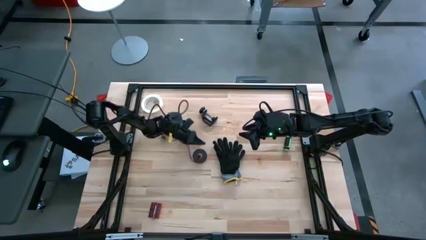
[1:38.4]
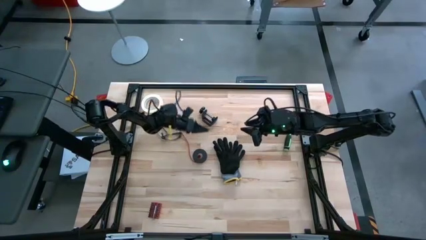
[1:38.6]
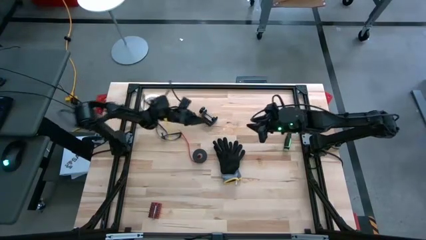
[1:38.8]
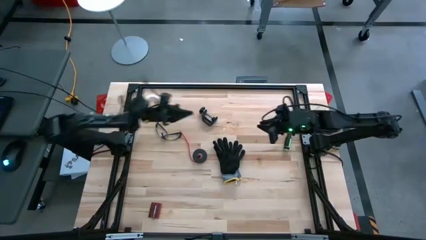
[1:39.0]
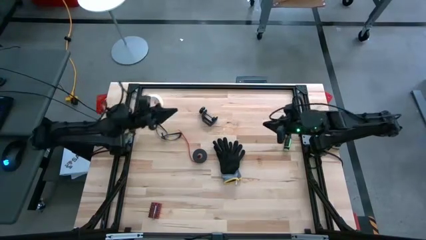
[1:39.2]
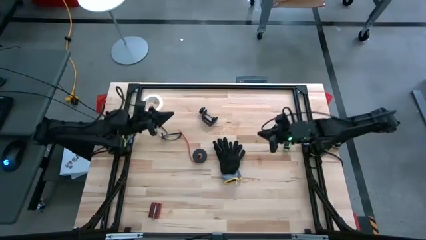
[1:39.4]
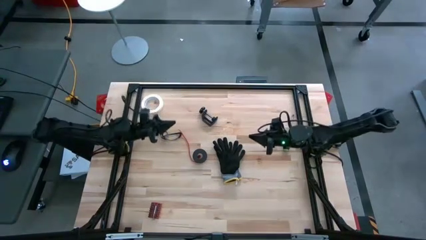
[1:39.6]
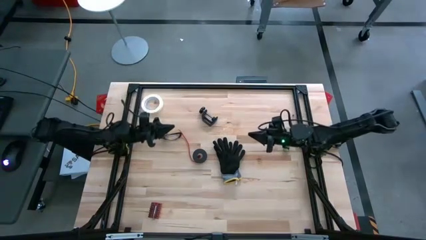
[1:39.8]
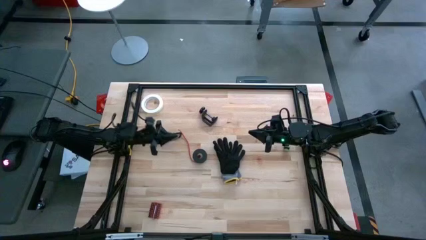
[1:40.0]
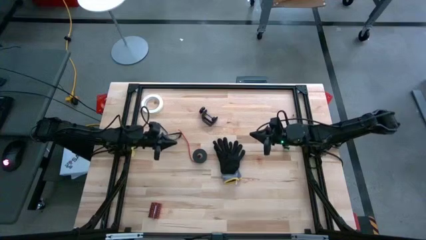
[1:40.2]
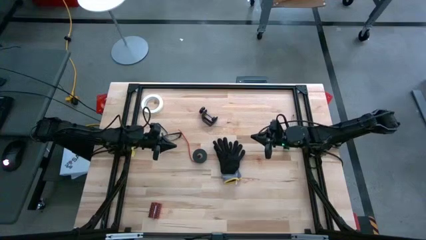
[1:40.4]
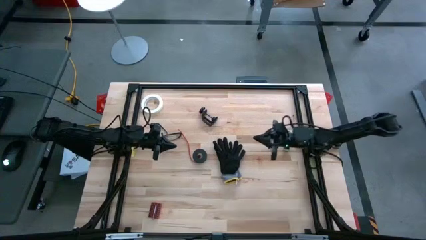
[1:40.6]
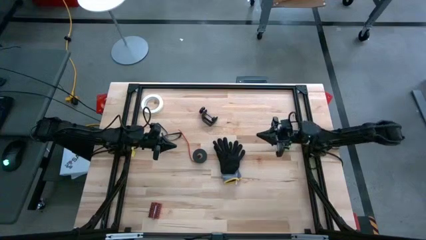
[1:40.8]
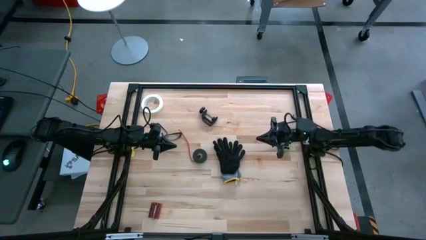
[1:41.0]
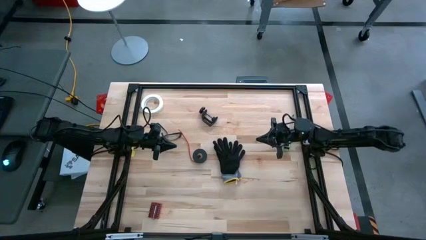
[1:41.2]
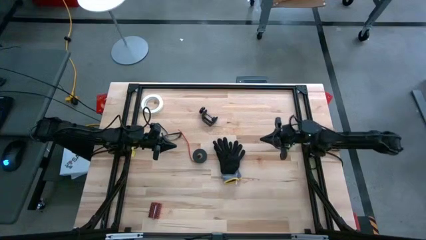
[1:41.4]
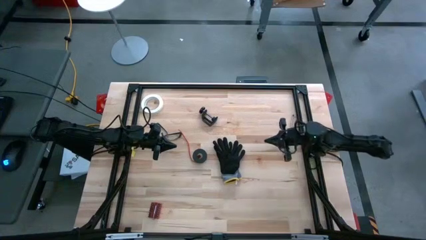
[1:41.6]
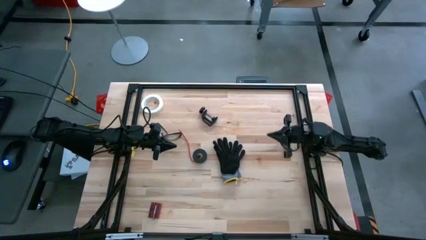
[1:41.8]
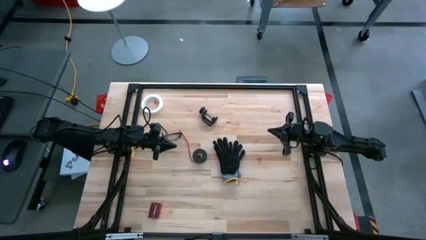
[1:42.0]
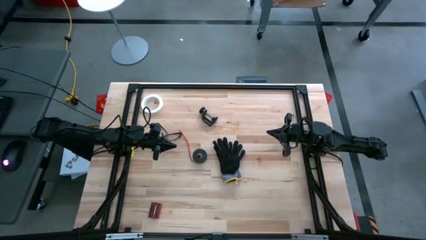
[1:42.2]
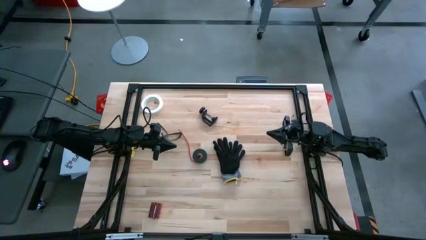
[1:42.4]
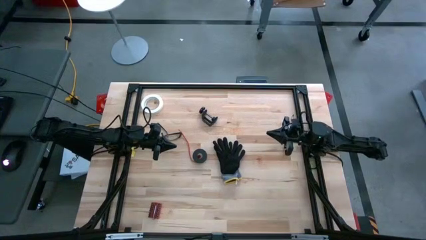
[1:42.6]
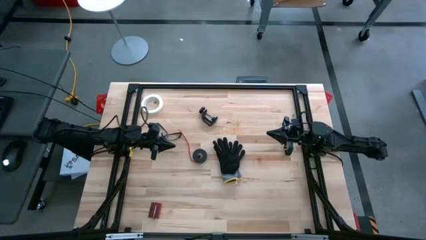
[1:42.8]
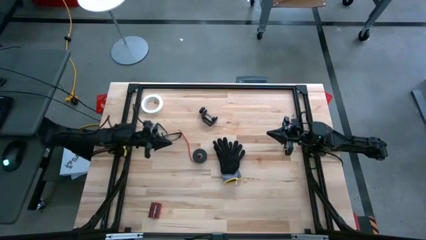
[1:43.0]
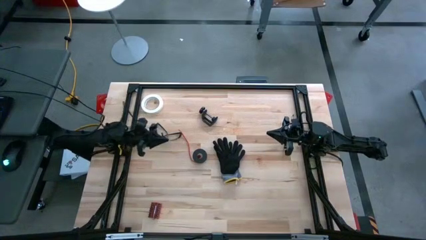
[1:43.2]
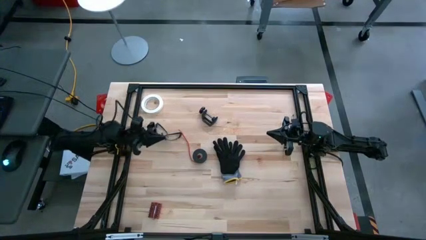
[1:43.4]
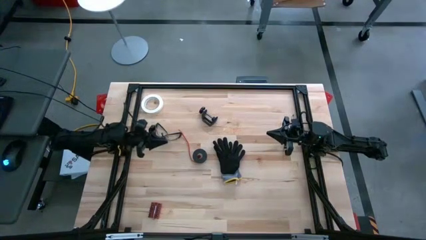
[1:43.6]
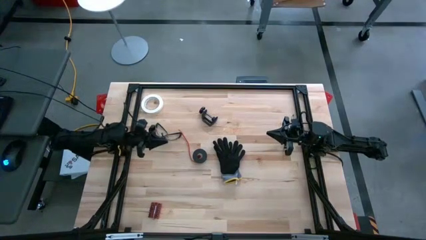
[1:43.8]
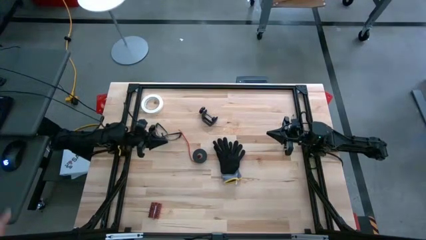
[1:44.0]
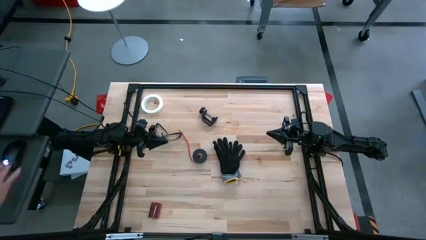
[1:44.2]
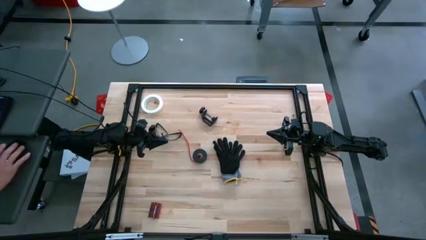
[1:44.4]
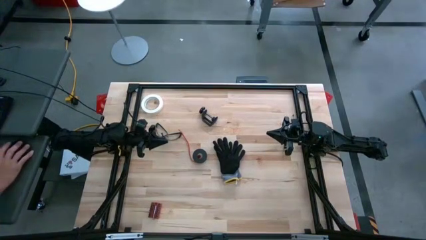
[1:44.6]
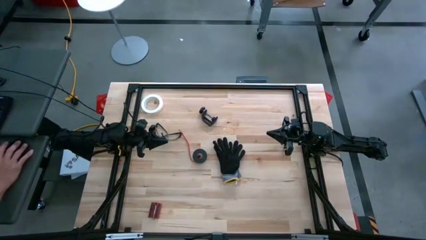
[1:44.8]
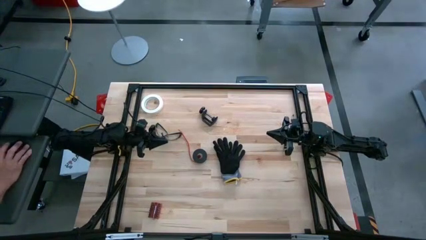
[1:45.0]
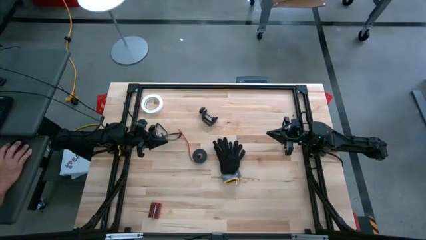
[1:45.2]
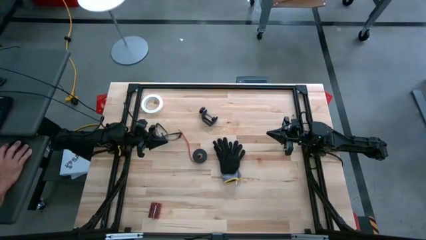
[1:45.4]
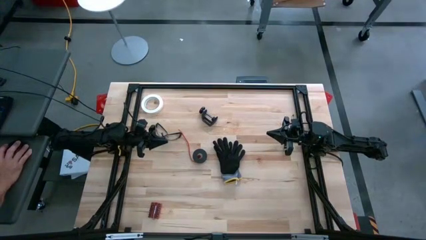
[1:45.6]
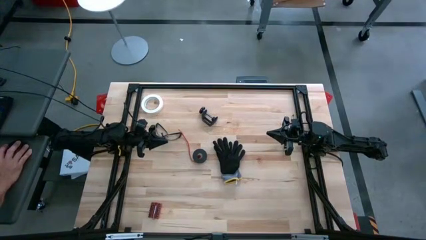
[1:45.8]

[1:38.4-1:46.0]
Task: Coil cords
Return to Home Position

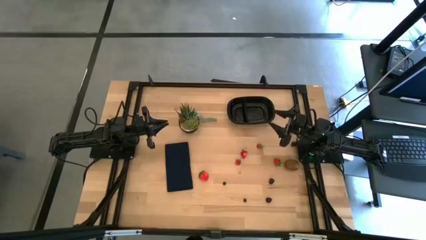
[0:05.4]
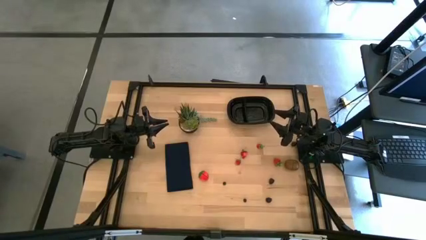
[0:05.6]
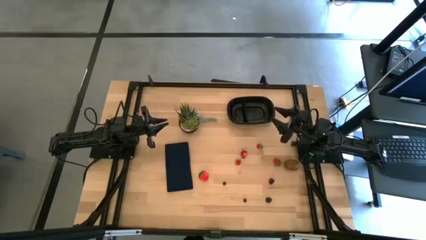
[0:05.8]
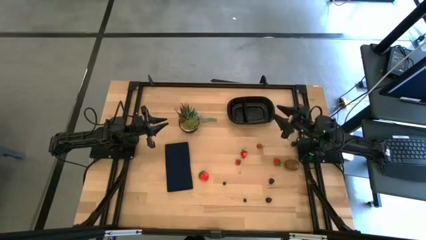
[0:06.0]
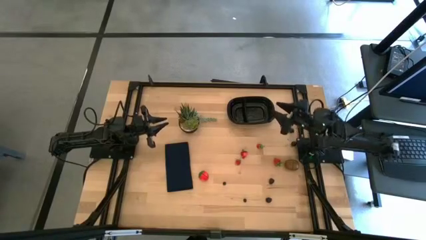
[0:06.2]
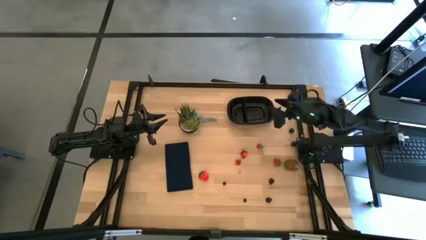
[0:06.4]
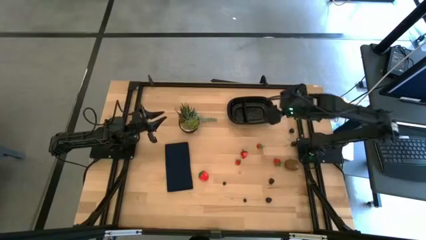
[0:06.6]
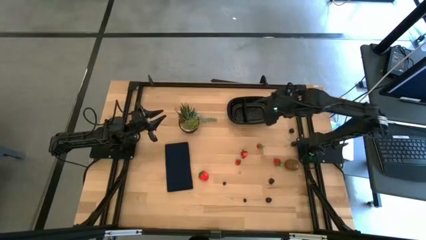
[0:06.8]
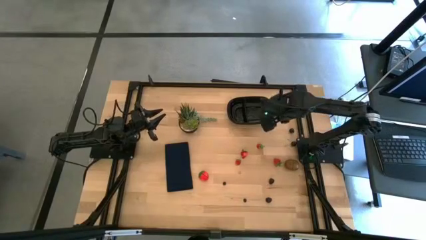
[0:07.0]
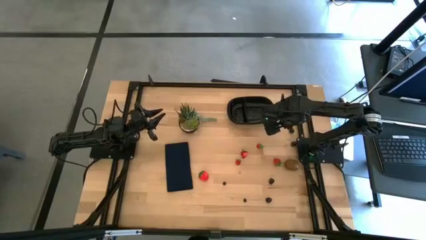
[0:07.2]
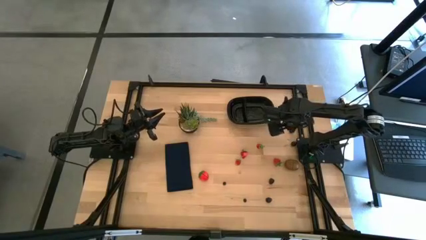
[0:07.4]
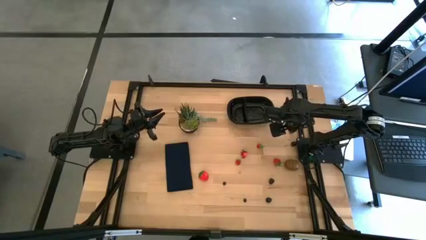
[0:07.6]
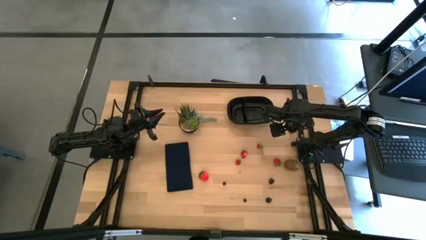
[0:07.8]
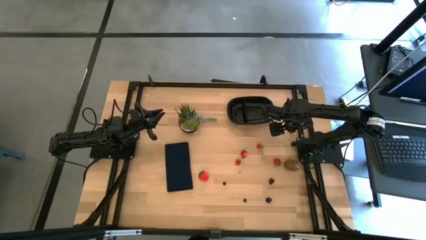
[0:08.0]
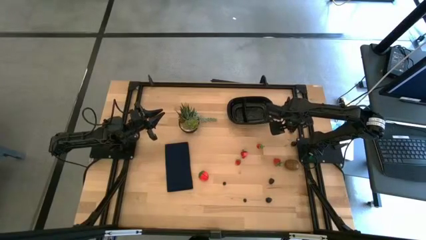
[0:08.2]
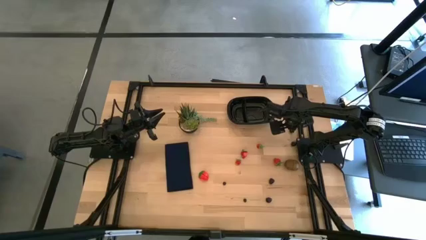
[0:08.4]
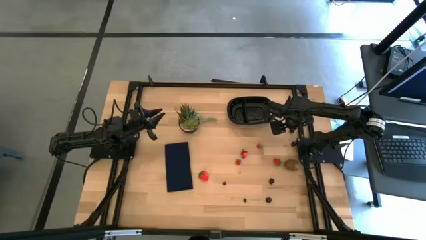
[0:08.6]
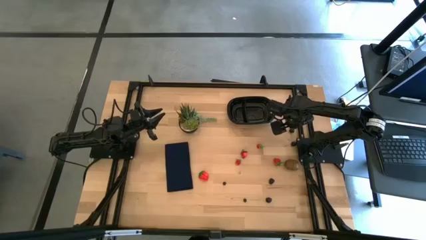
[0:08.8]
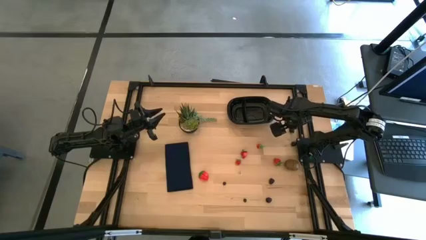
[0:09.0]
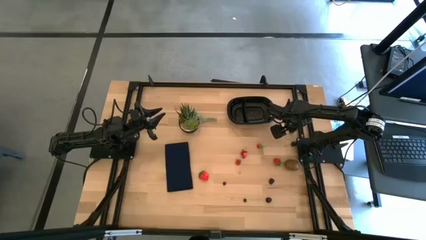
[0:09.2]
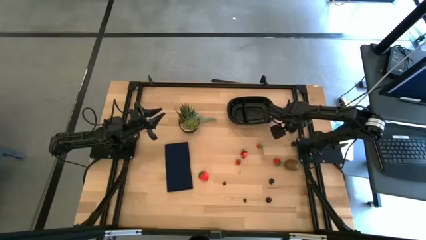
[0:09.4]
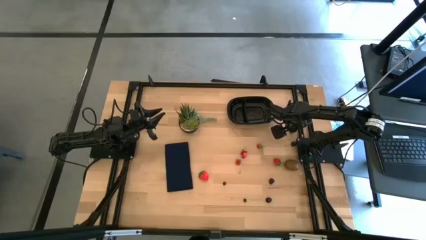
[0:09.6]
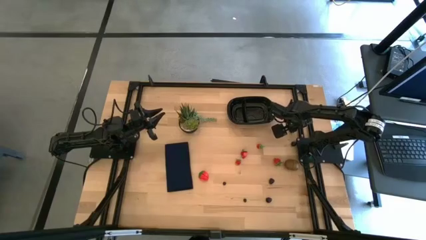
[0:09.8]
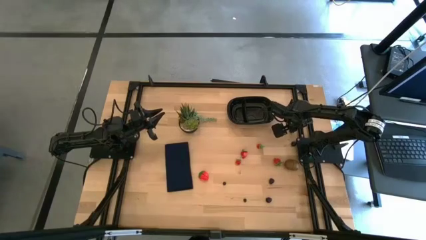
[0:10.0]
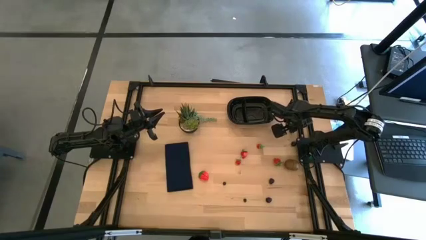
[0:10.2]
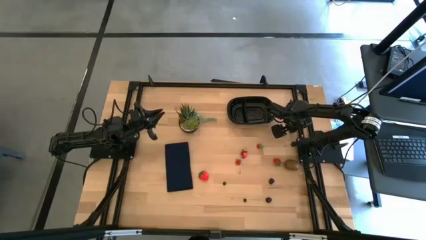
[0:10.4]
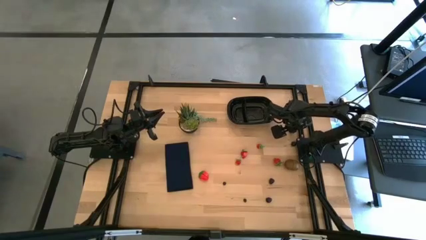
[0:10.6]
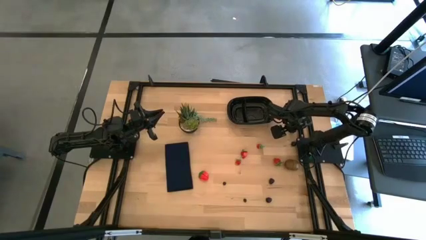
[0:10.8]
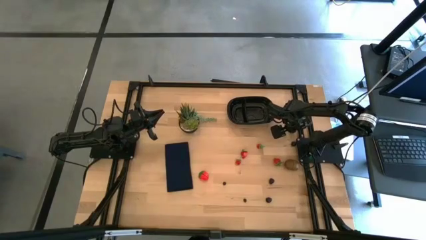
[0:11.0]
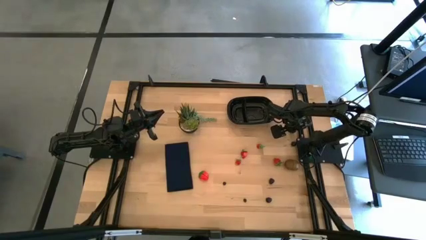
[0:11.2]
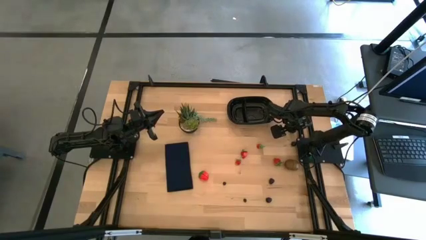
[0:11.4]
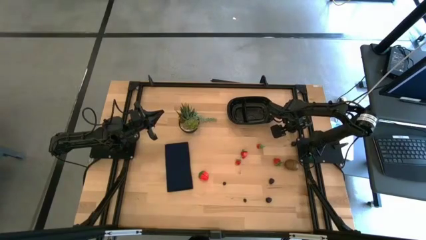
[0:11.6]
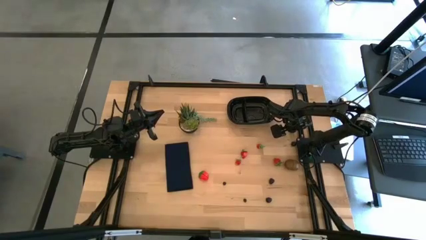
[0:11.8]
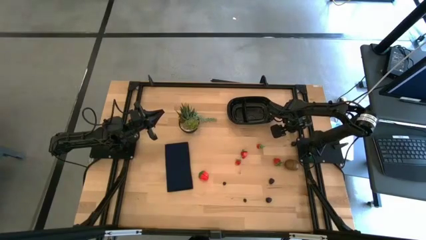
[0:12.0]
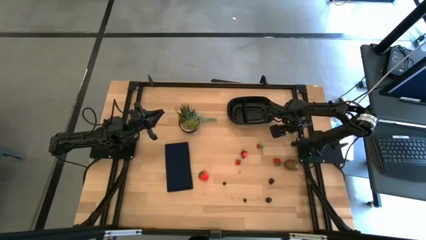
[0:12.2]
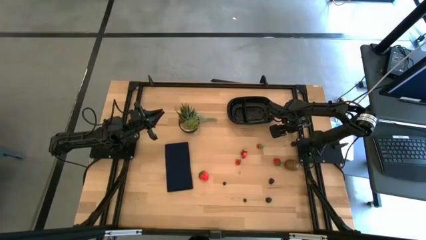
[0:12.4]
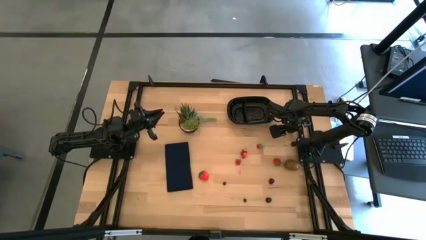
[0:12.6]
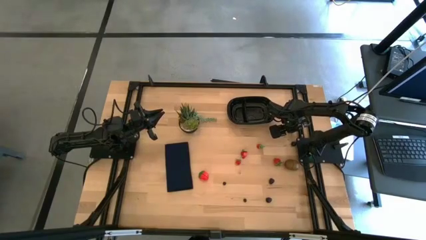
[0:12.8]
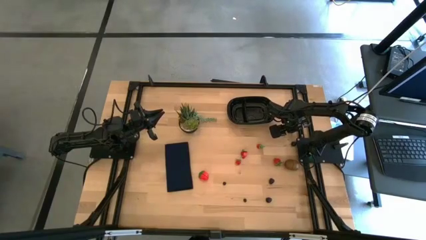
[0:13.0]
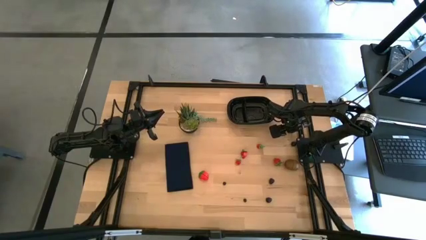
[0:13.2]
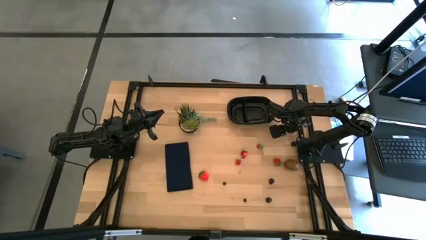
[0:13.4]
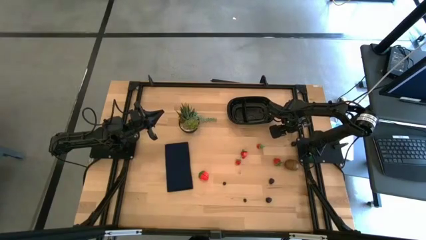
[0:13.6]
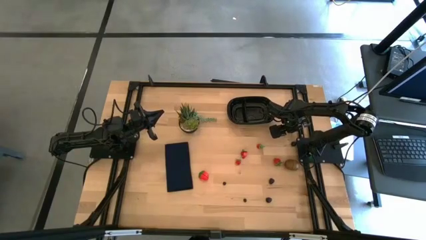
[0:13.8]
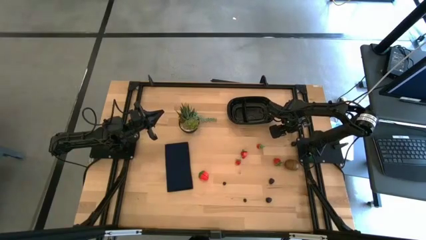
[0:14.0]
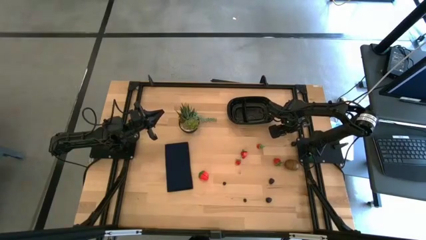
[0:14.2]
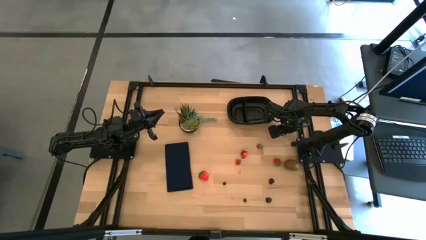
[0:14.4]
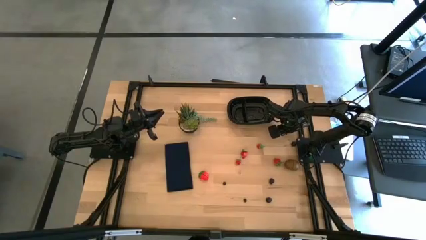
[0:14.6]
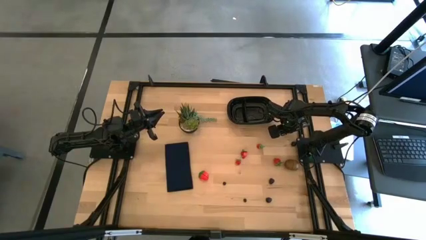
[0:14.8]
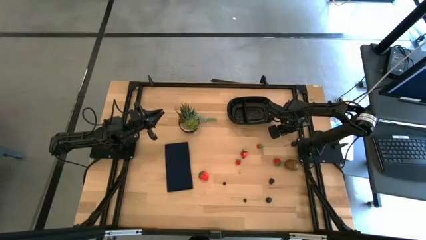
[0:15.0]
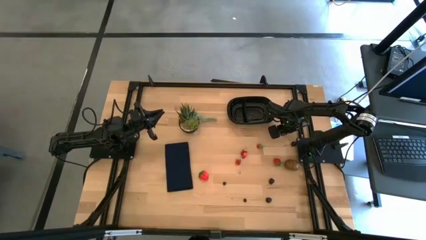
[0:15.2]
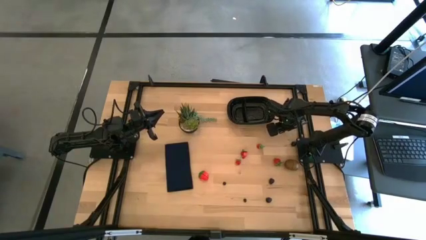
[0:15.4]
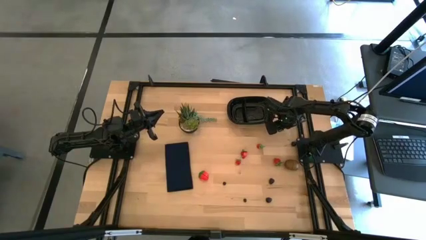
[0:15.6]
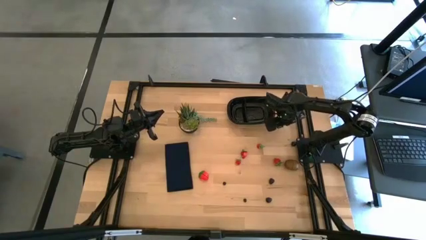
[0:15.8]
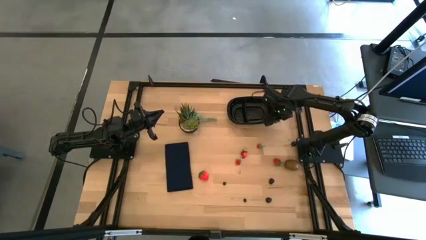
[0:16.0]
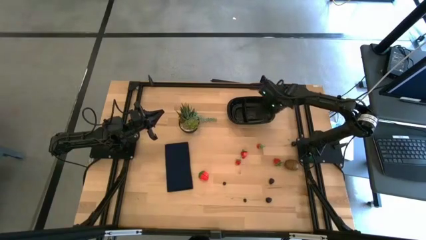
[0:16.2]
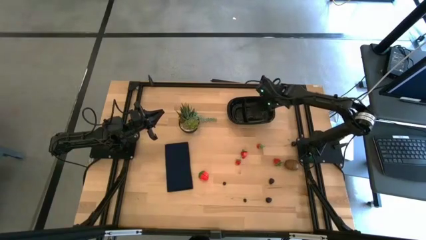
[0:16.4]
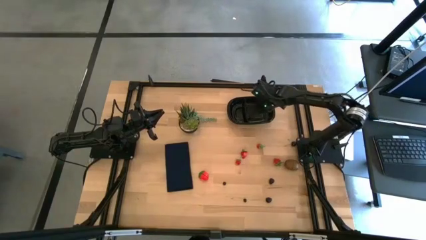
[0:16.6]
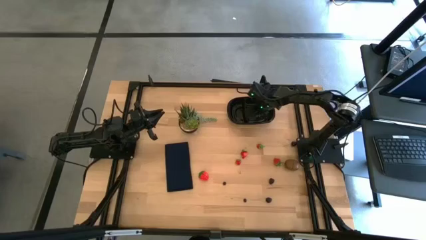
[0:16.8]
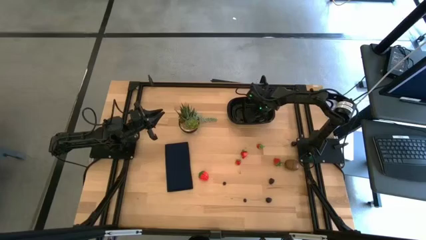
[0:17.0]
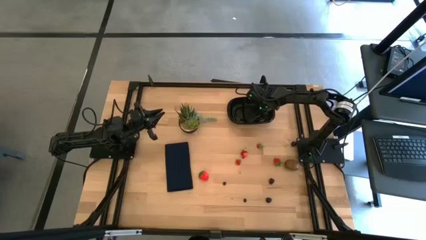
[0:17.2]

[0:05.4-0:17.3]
Task: Pick and placing Produce into tupperware
Put the top black cherry into the black container
